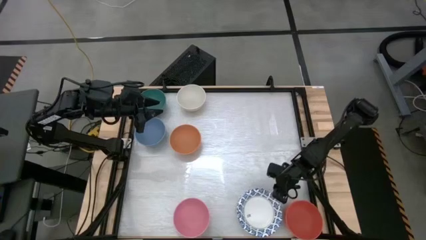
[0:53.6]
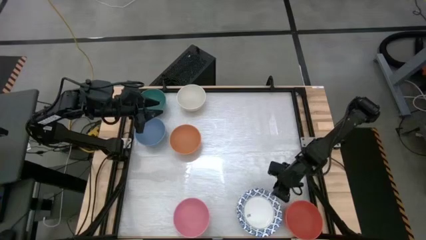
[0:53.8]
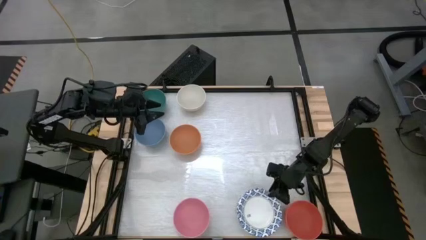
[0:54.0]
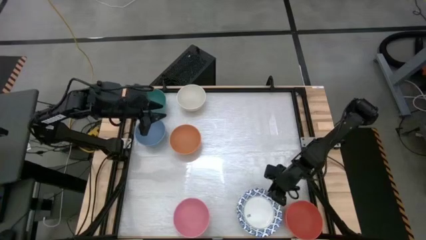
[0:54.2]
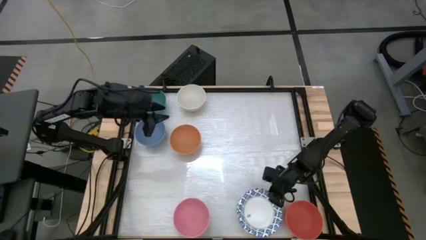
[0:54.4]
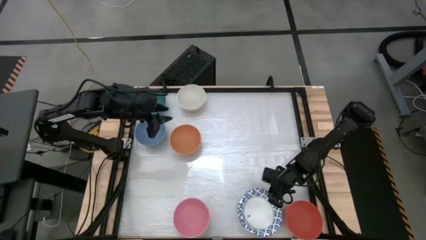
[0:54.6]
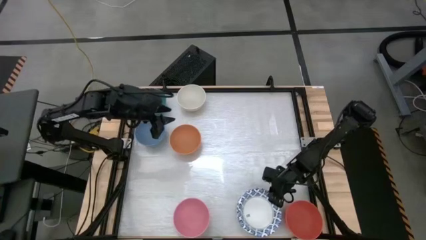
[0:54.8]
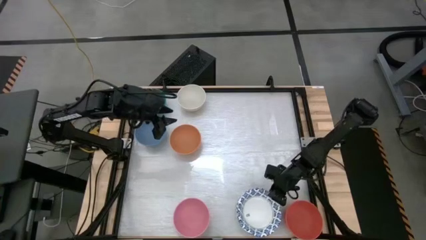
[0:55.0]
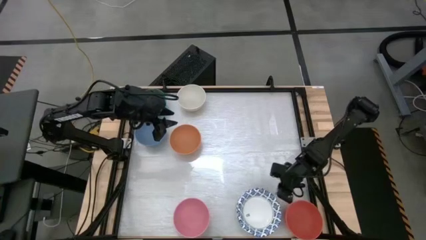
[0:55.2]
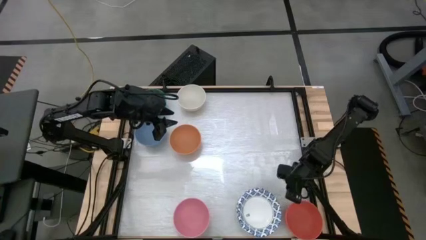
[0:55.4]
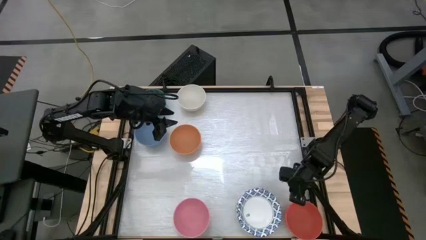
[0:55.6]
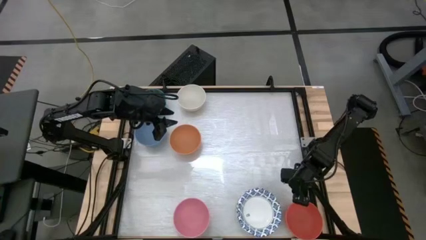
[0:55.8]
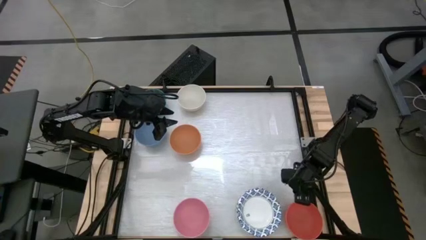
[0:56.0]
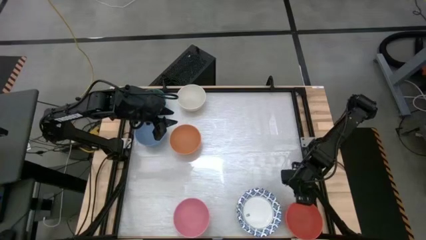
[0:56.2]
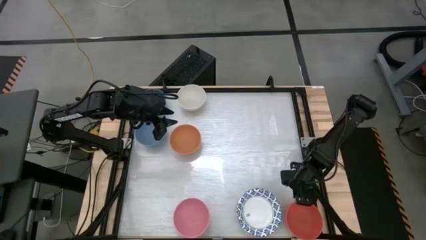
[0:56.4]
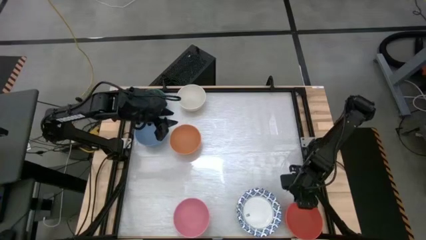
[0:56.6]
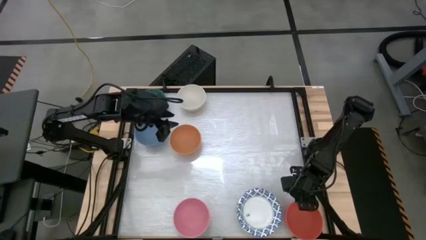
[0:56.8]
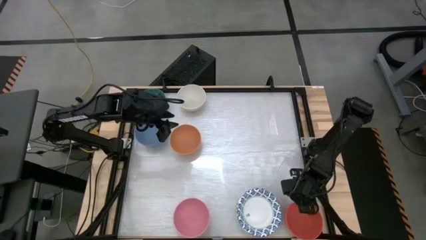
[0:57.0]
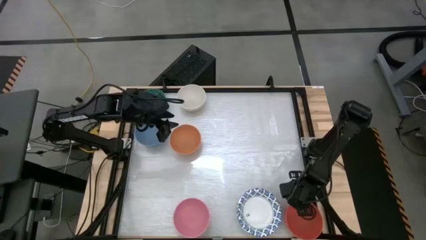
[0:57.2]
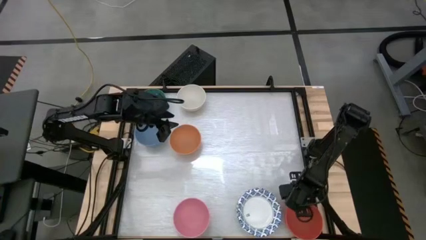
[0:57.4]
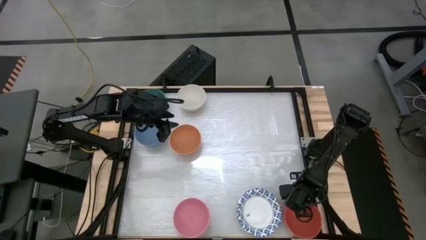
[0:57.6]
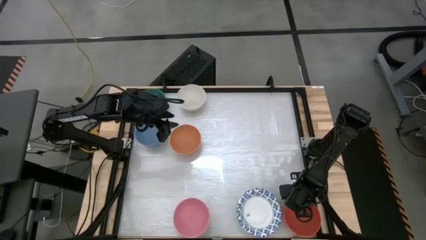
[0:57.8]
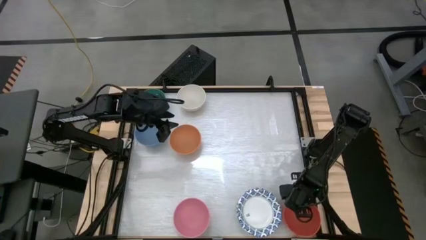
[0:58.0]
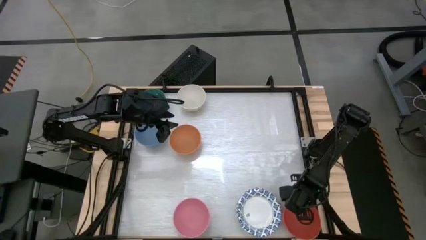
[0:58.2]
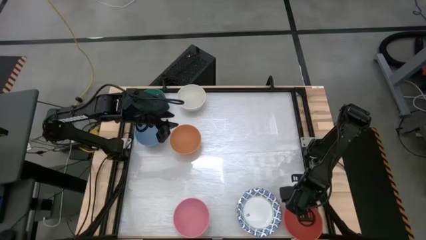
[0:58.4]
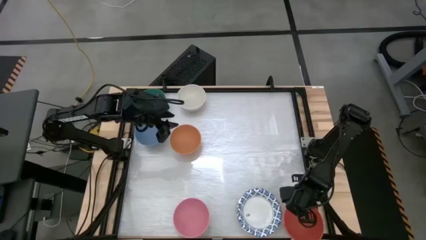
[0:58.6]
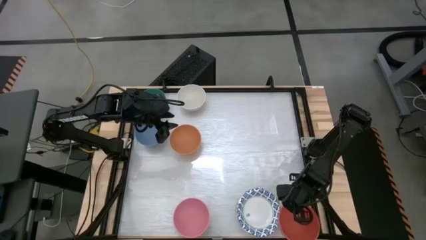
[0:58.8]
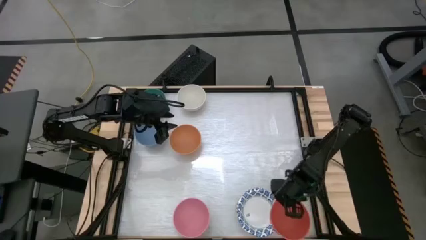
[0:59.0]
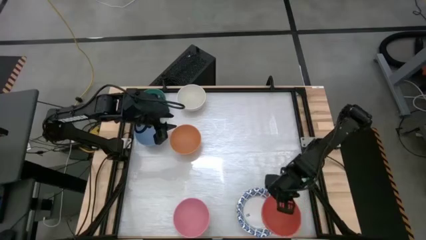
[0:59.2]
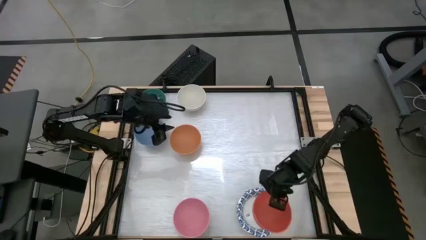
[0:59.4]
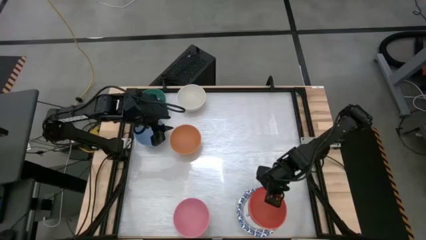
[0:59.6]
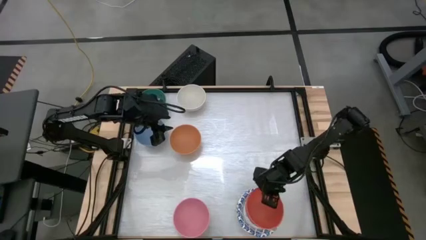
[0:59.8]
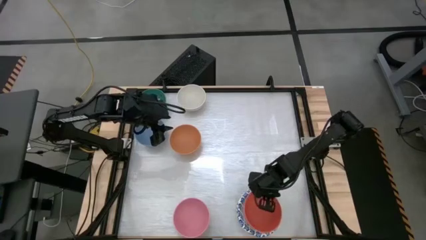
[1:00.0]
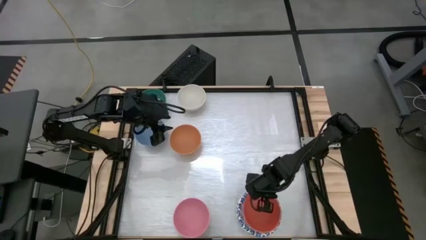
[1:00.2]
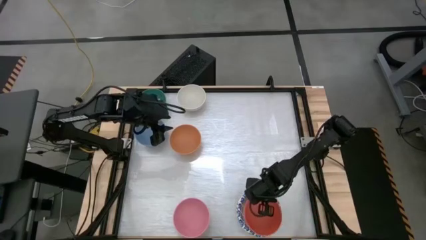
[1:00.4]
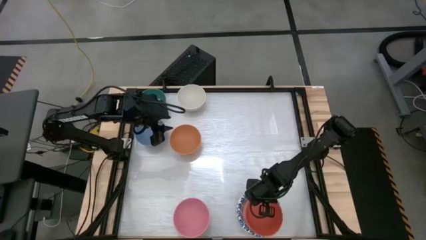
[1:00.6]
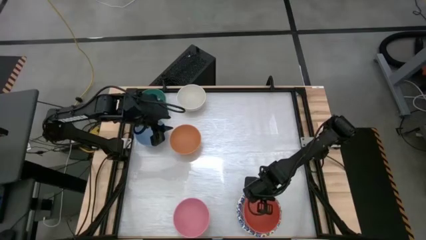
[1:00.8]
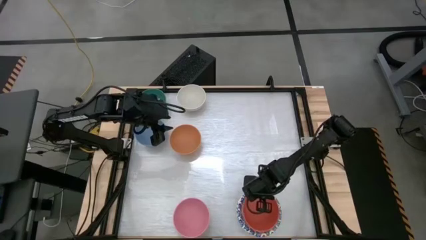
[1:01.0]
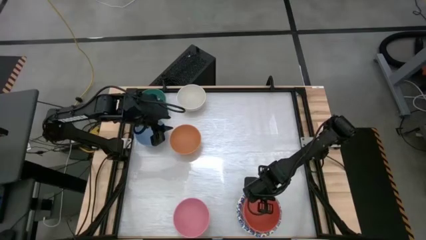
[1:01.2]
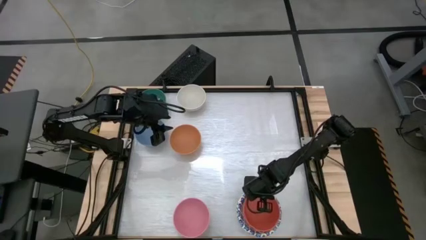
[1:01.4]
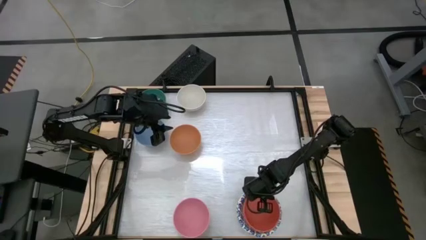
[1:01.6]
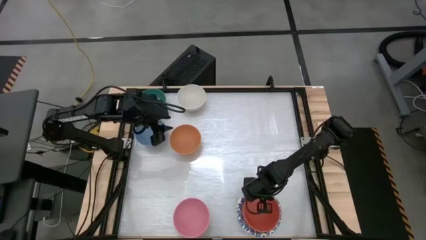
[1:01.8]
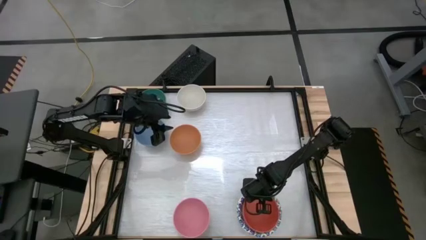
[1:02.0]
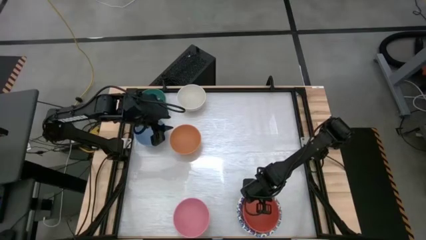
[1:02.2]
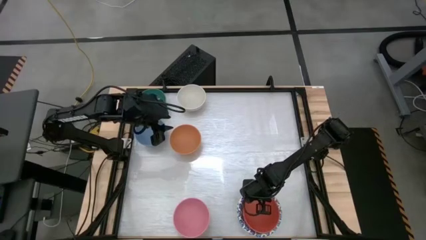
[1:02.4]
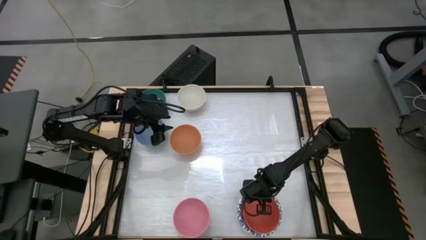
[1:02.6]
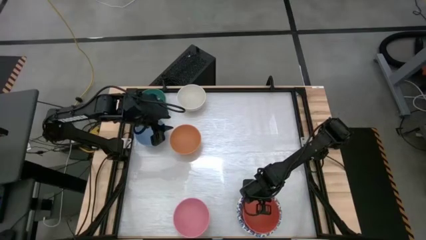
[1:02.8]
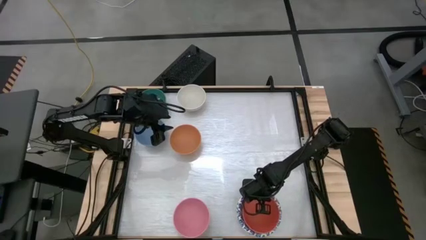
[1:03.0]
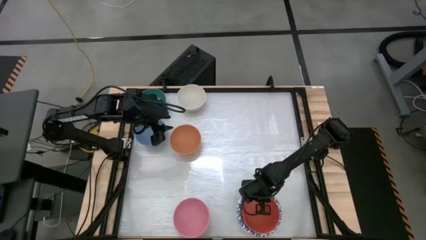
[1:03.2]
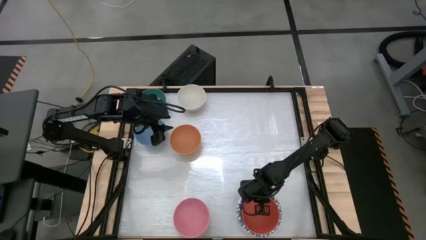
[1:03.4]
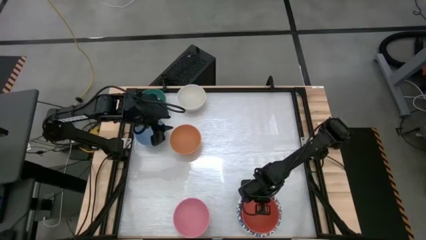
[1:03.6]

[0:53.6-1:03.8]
Stack the orange bowl on top of the other white paper bowl

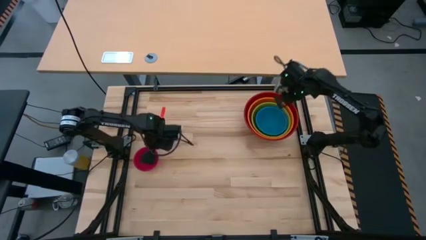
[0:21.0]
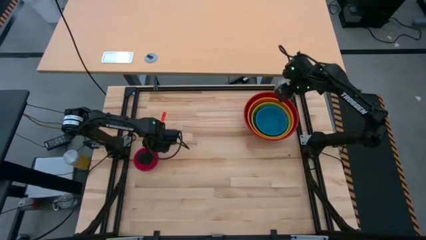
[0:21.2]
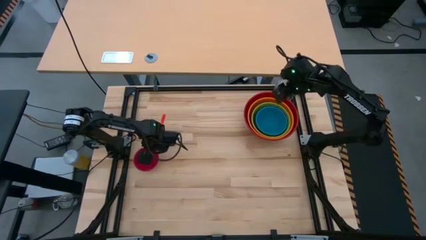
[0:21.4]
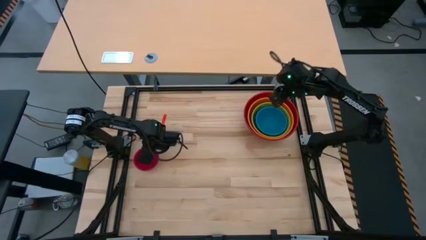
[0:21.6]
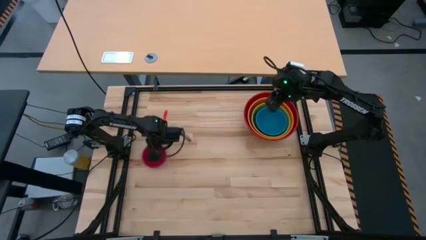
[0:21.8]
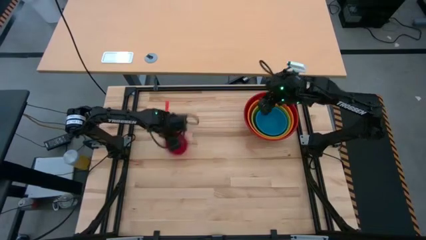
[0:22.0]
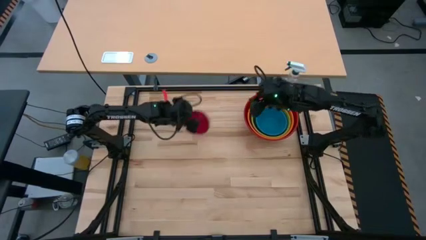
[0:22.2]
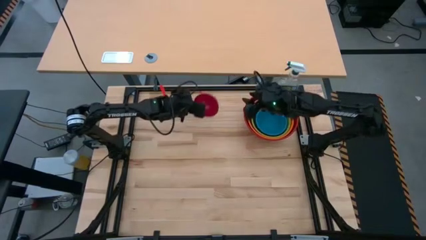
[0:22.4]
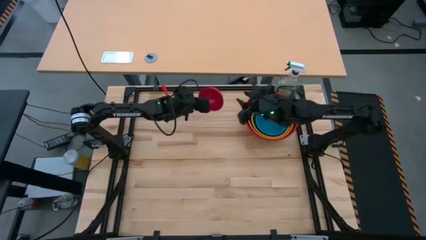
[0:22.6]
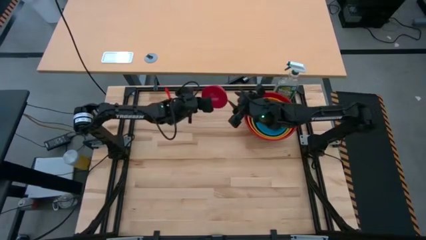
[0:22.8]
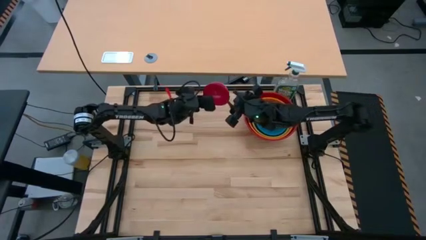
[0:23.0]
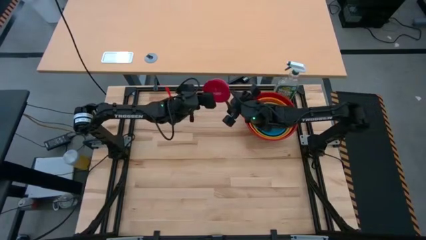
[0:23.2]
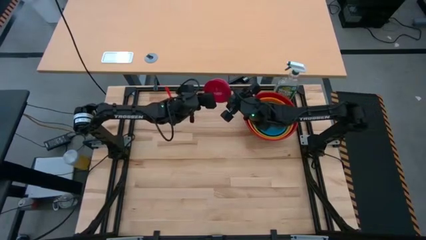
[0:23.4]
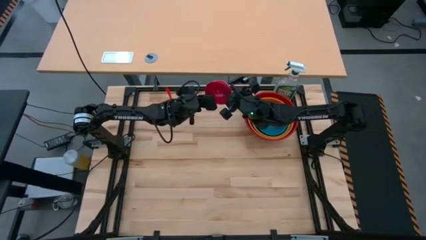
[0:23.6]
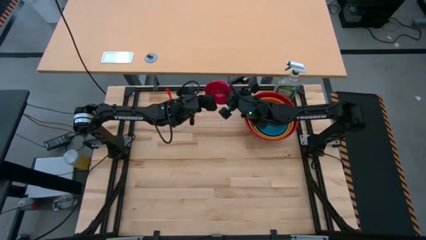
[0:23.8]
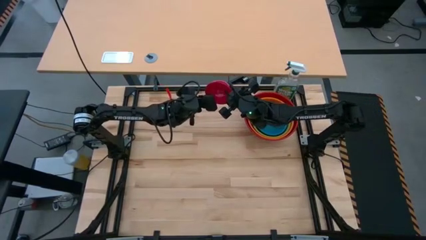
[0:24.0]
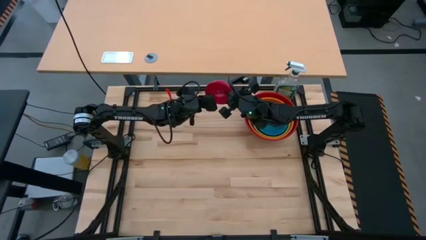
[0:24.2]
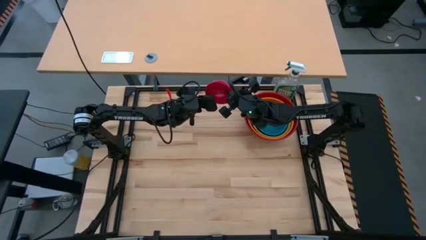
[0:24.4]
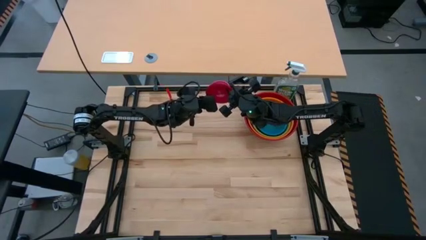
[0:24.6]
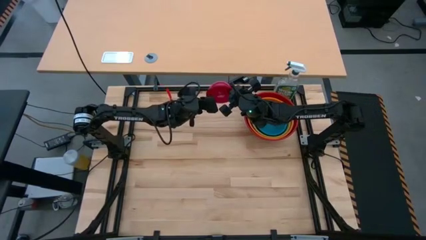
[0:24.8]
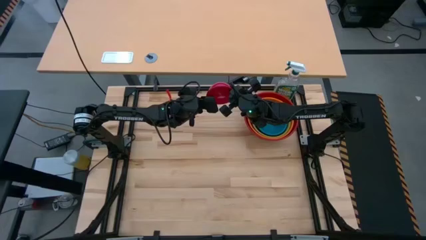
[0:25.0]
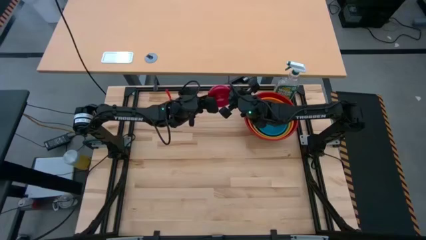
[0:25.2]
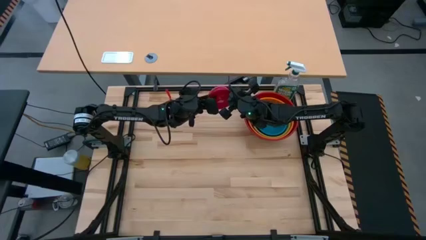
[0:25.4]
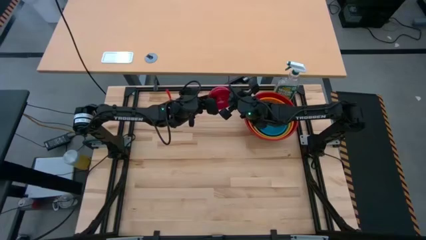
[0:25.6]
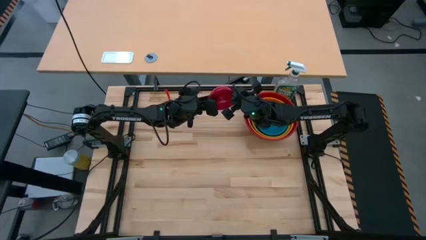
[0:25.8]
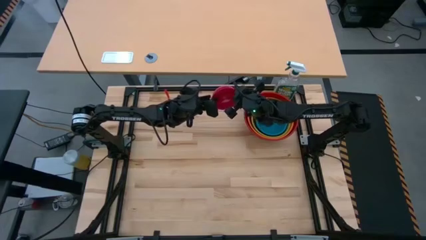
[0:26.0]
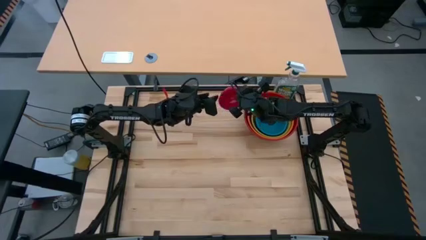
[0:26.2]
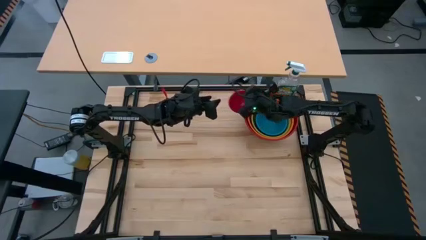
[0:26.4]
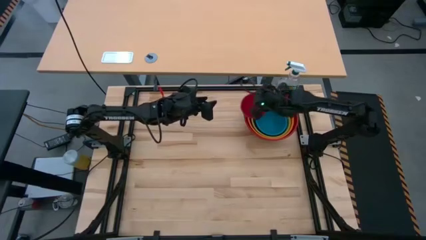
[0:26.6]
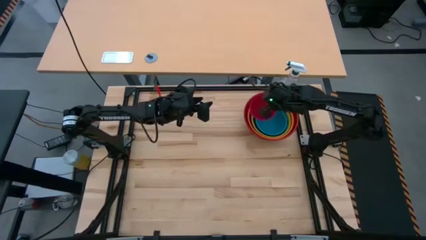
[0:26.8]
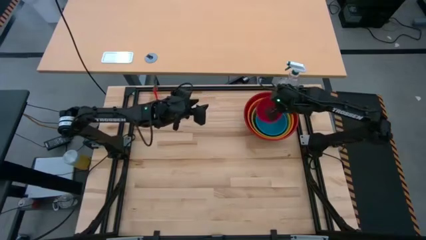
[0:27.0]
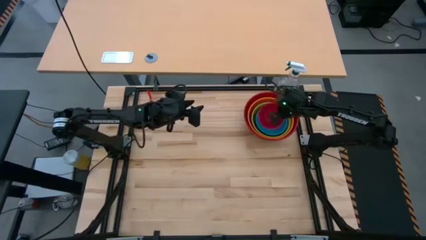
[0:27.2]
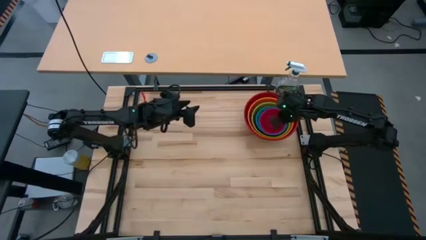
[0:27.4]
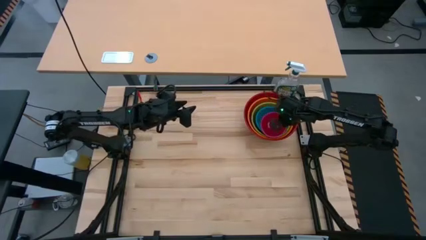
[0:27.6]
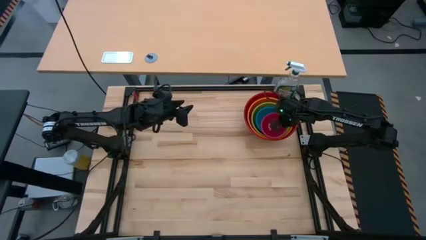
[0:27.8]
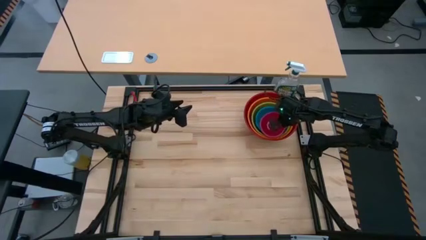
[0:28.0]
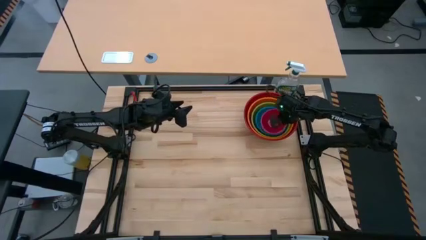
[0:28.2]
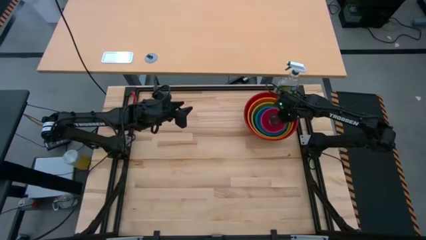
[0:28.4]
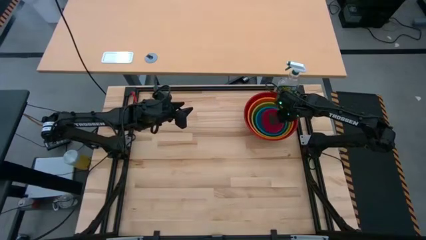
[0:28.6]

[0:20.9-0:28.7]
Stack the red bowl on the blue bowl

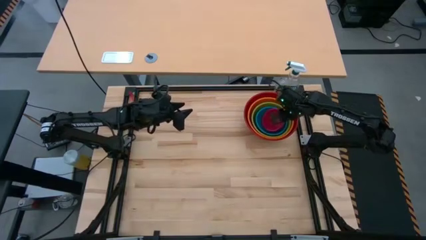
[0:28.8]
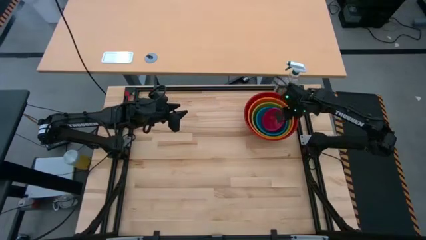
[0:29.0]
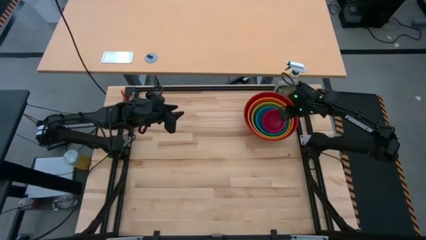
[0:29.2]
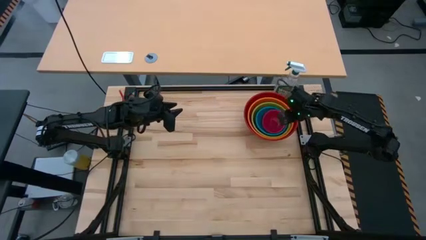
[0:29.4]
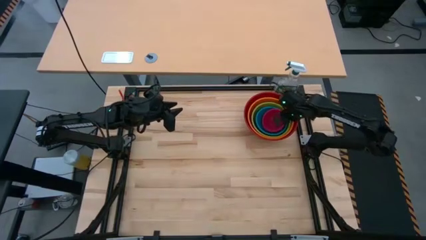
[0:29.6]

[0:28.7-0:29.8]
Adjust the red bowl
